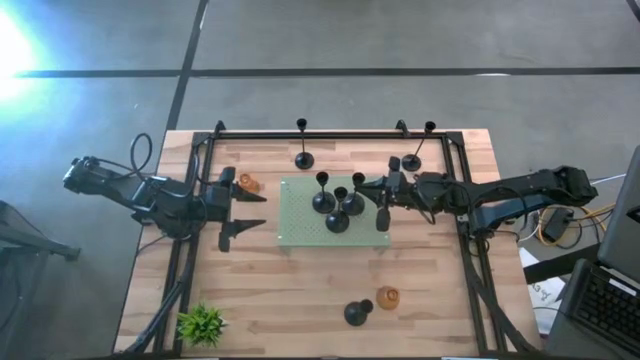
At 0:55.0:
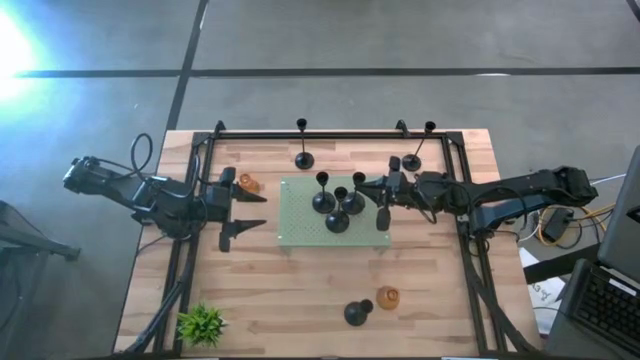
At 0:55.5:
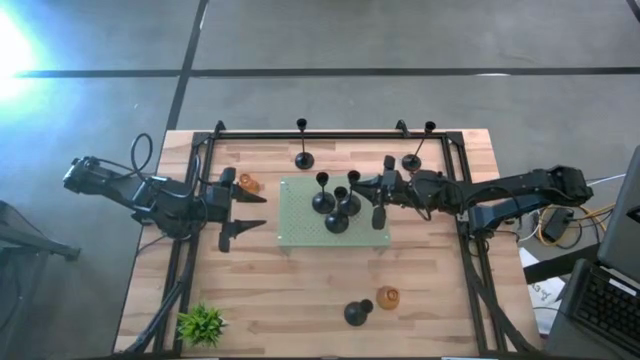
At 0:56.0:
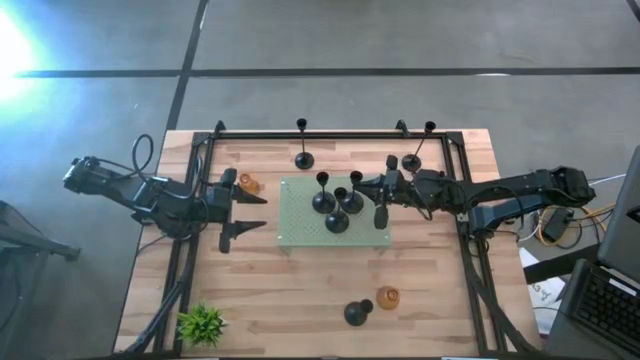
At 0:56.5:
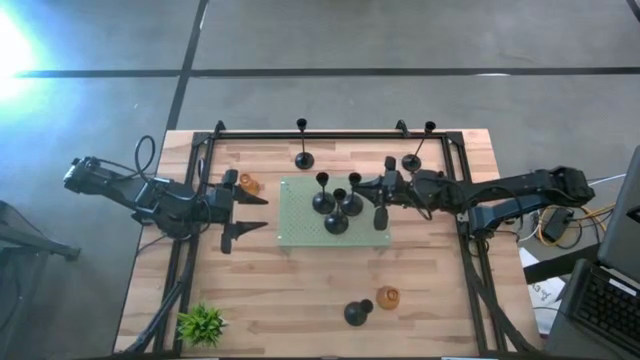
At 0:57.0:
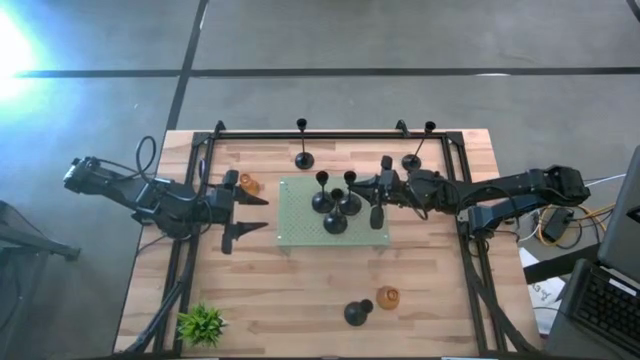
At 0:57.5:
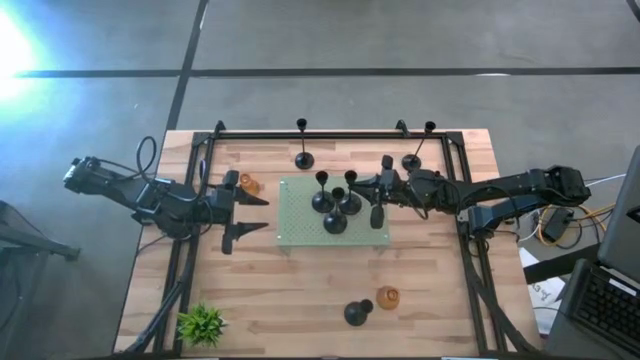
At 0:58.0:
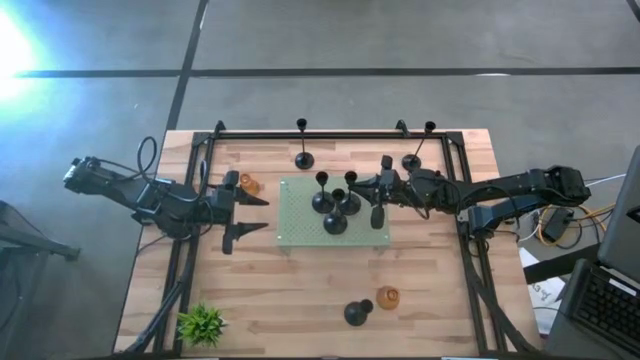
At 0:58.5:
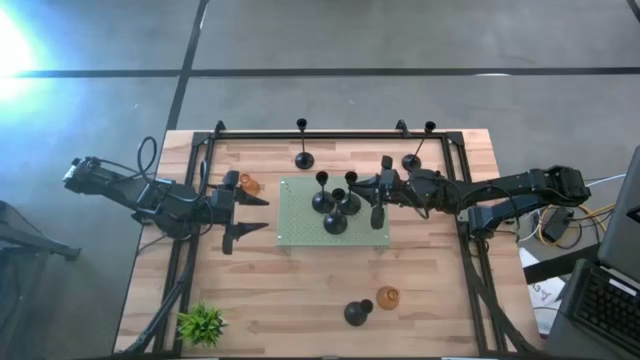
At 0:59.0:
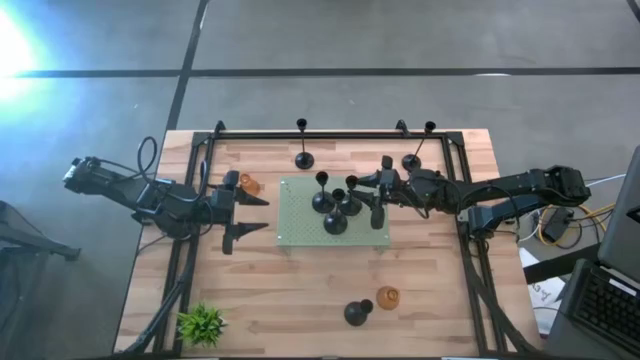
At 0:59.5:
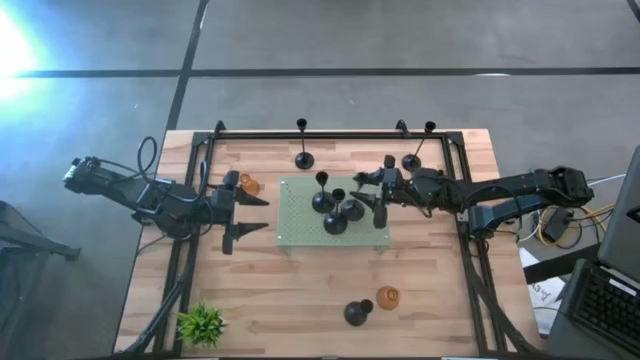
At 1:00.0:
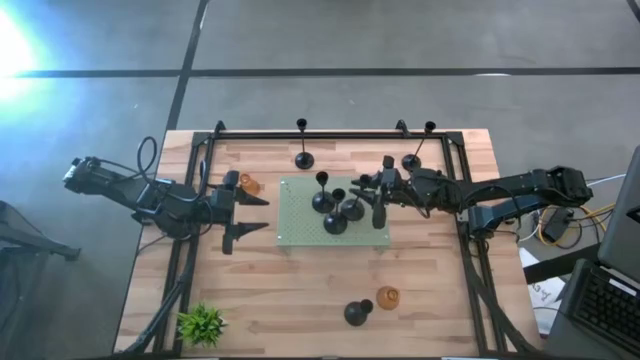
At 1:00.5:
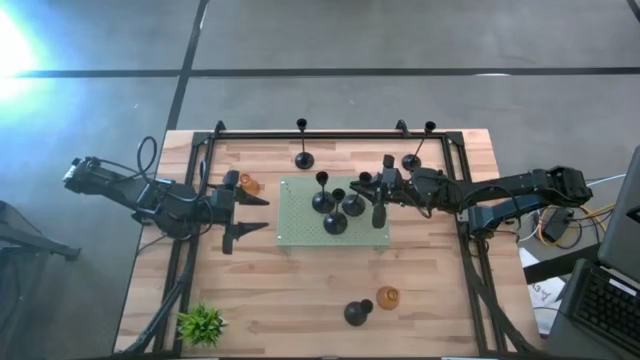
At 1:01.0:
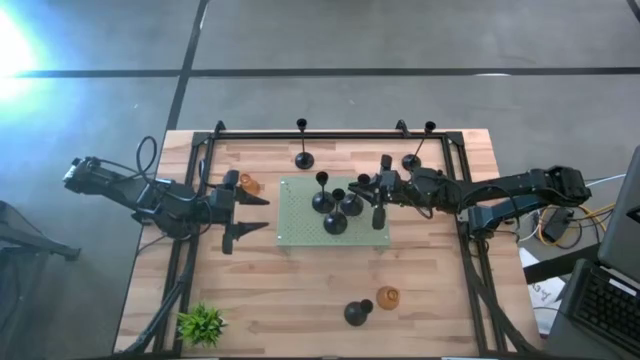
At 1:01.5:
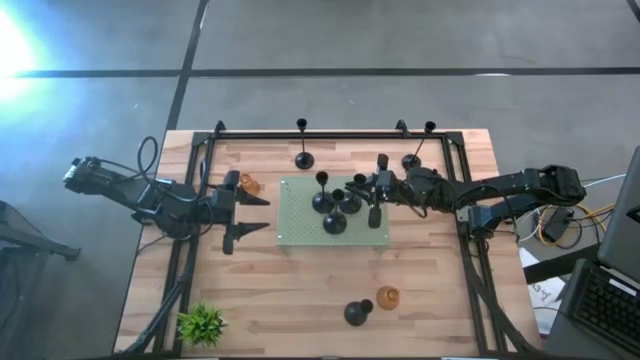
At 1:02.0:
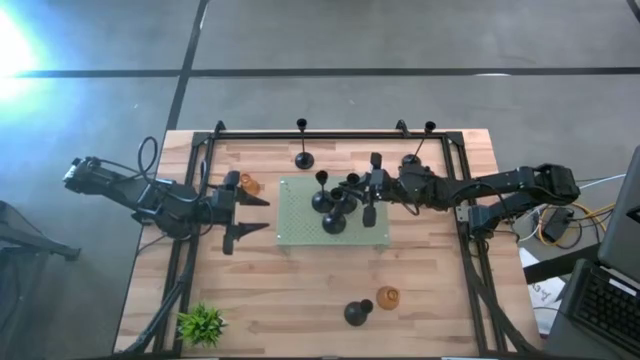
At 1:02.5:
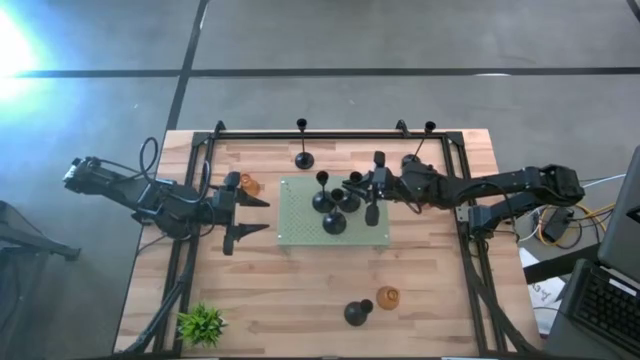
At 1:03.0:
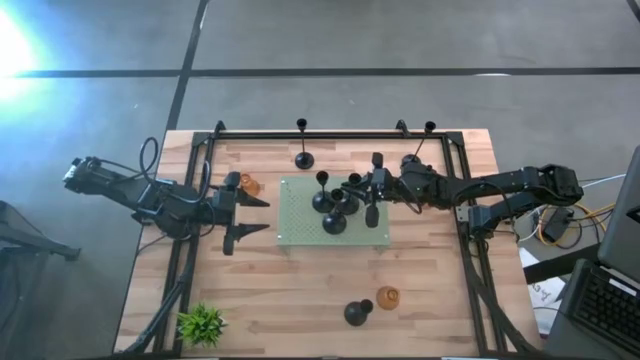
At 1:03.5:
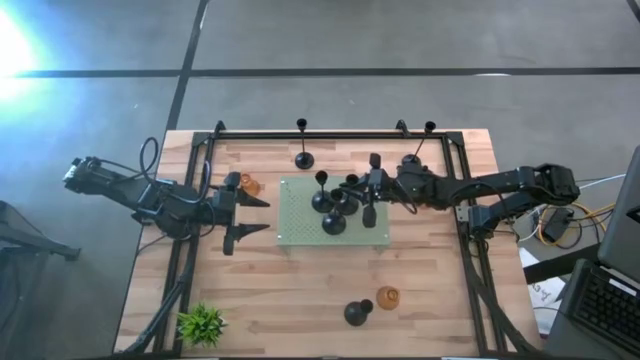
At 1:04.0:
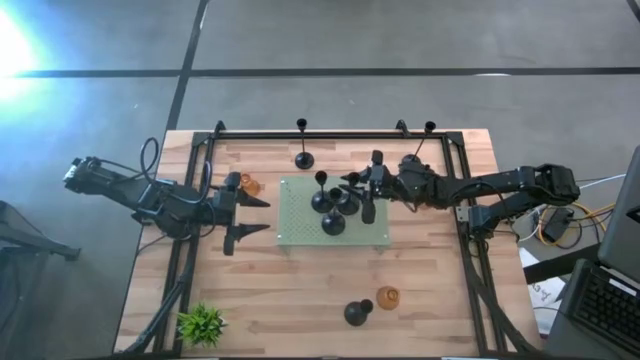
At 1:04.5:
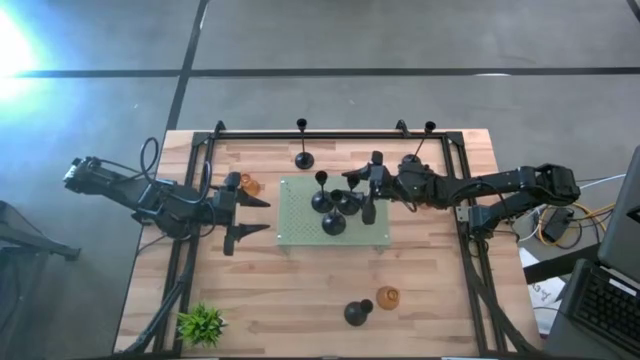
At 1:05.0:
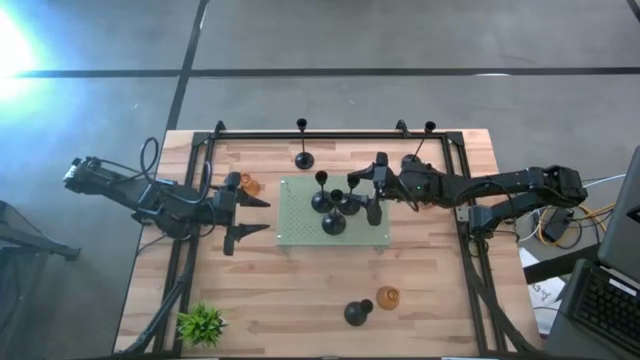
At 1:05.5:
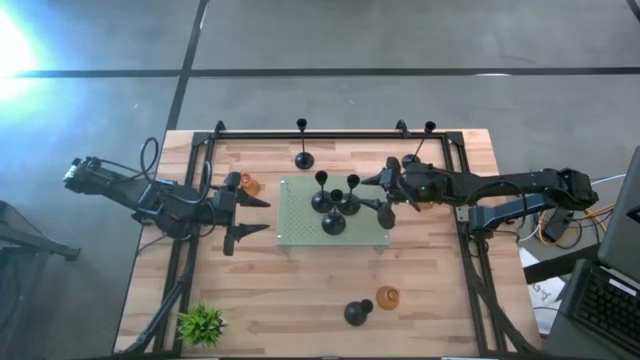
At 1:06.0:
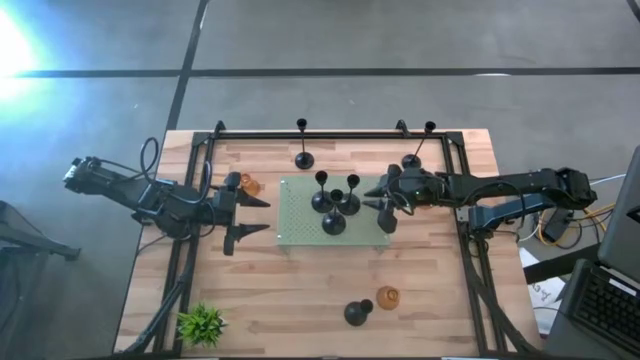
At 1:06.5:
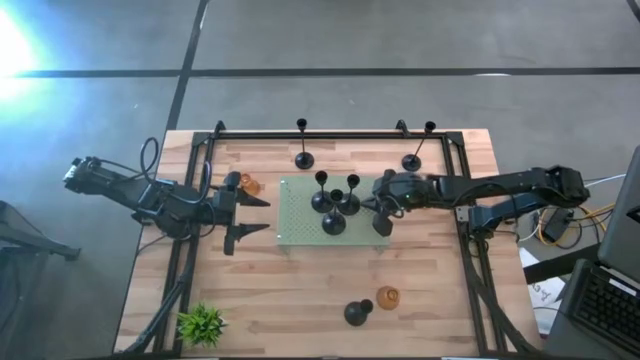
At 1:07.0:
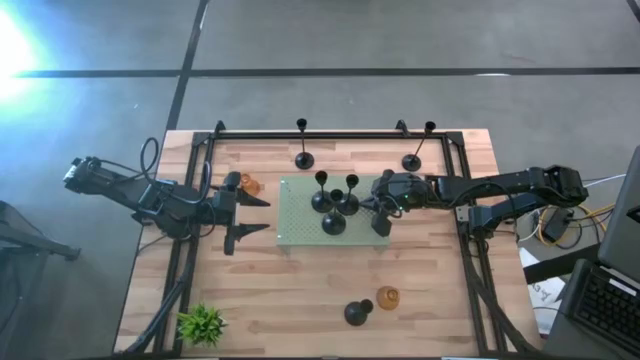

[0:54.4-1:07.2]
Task: Pick & Place candle stick holders
Put the black candle holder on the shelf

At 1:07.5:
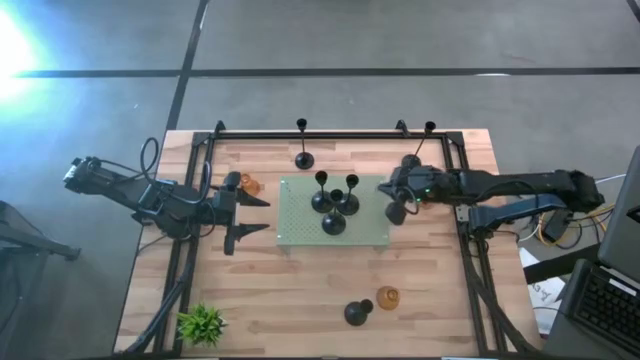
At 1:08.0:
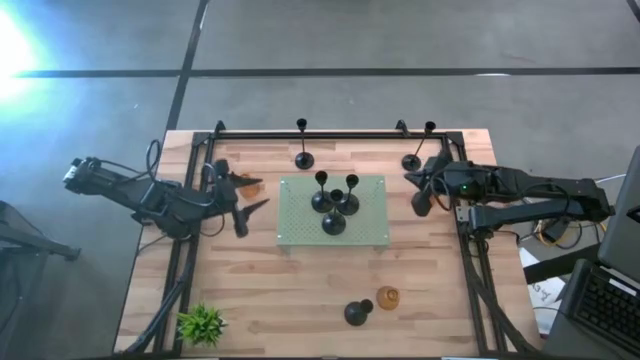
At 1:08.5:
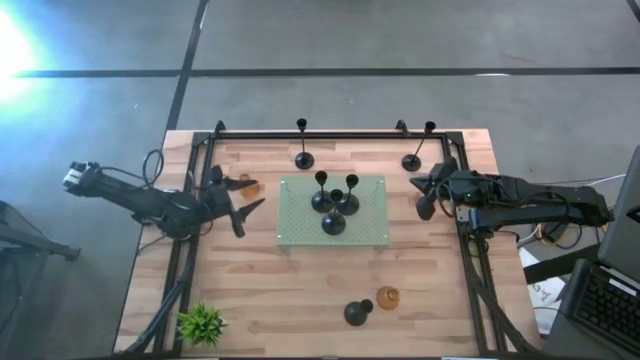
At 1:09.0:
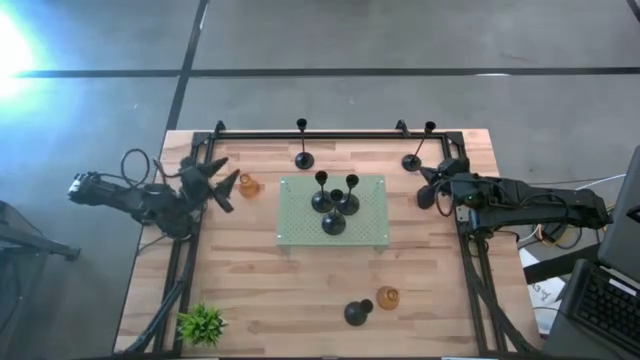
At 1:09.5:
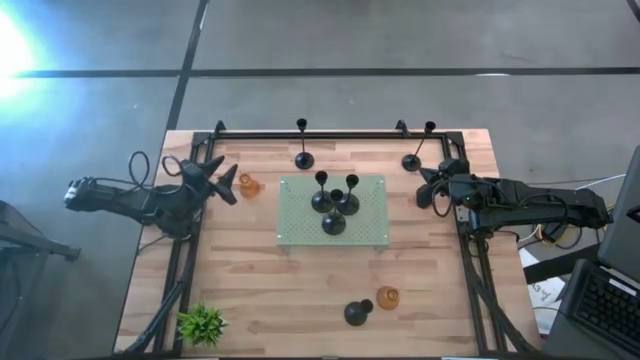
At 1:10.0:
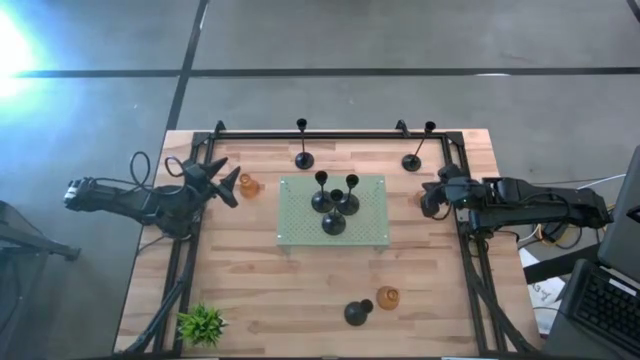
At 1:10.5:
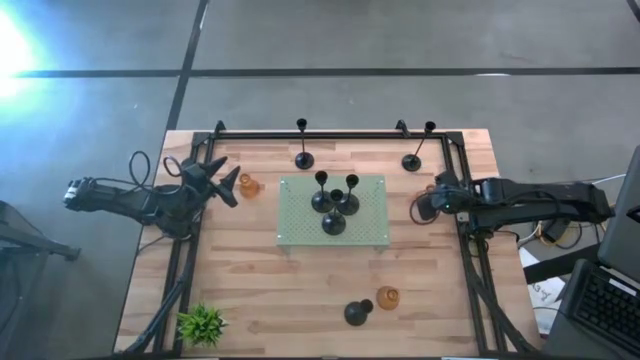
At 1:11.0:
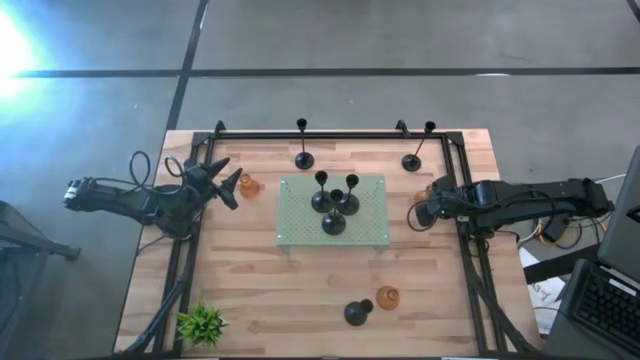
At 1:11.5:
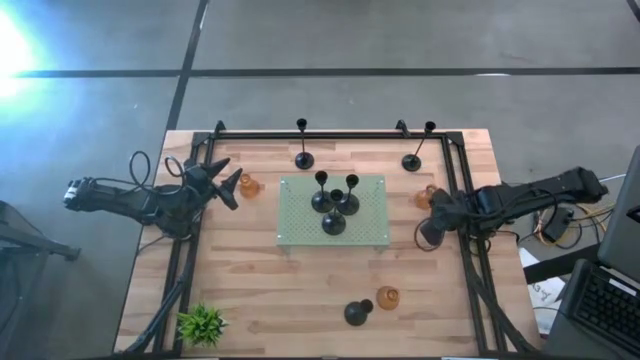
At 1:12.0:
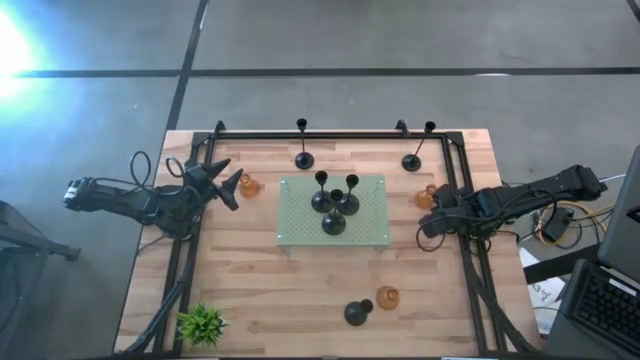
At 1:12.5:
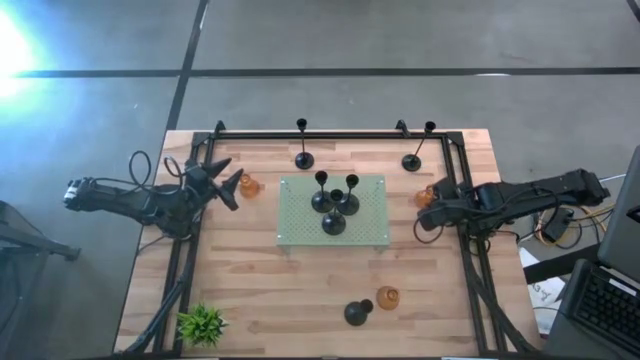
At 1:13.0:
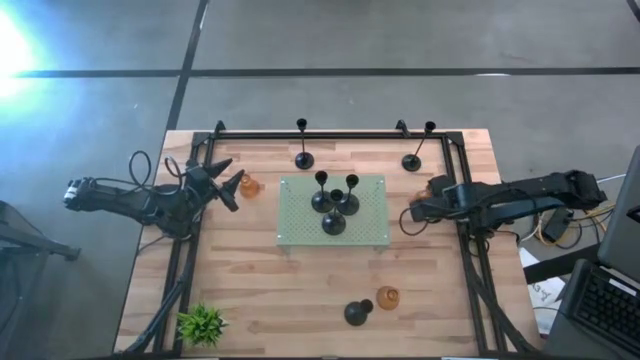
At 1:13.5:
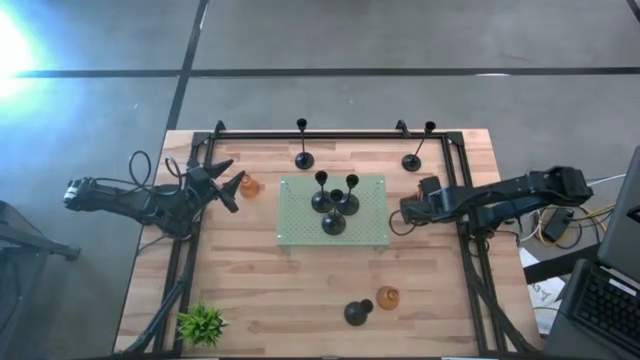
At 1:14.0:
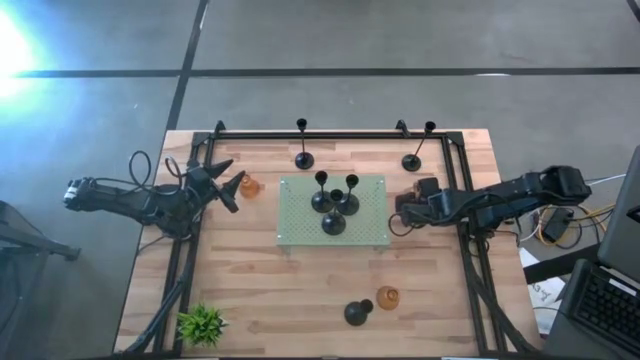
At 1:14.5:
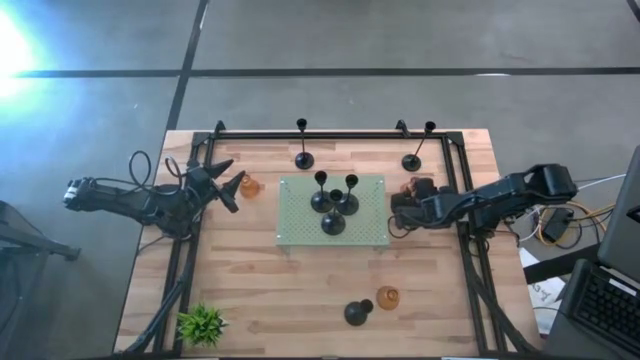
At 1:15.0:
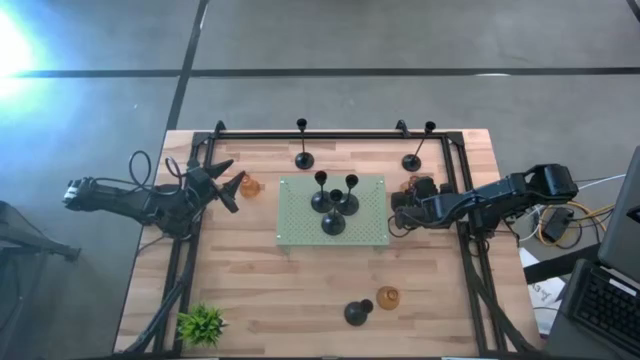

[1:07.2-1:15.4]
Put the yellow glass on the shelf

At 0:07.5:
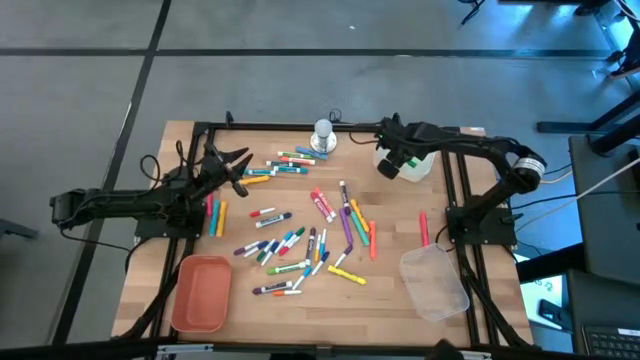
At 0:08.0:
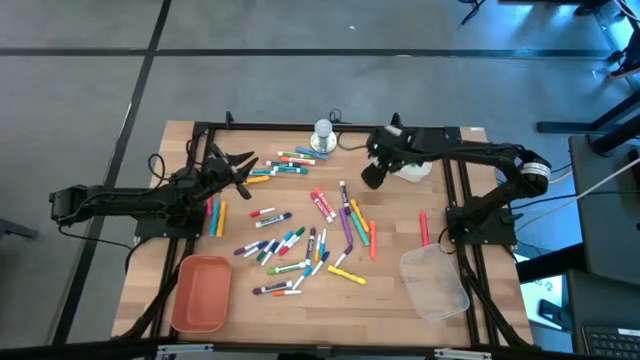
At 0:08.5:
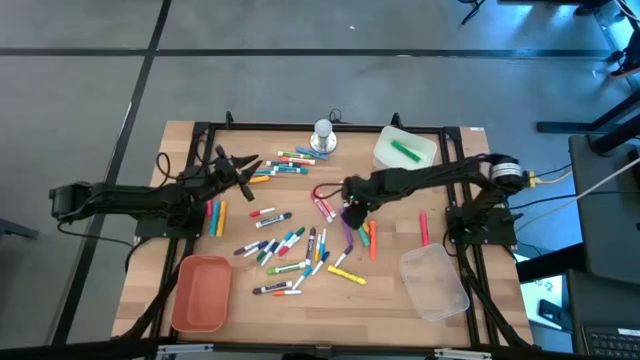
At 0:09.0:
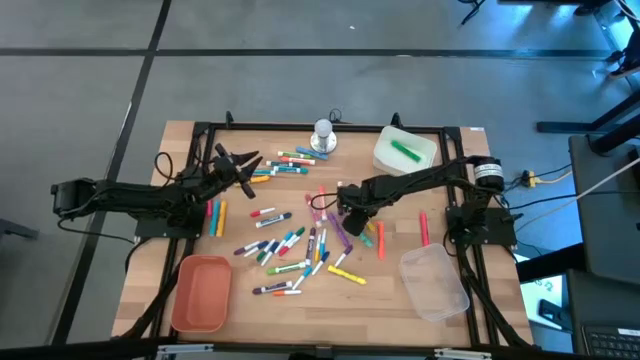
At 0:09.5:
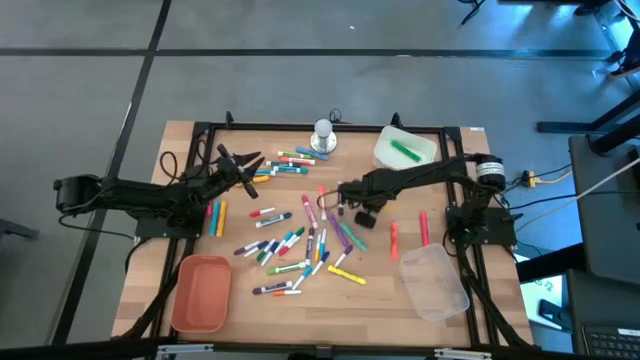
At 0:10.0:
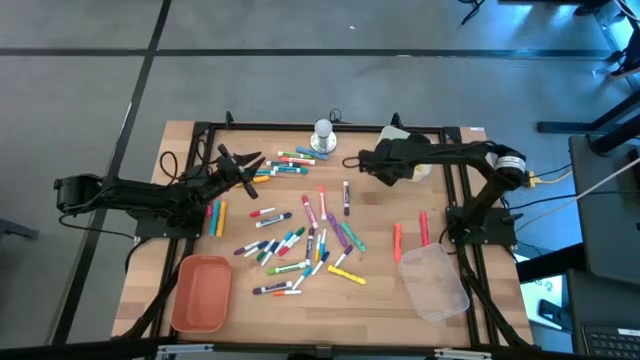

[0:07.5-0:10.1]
Task: Pick & Place Markers
Put the large yellow highlighter pen into the white bin
